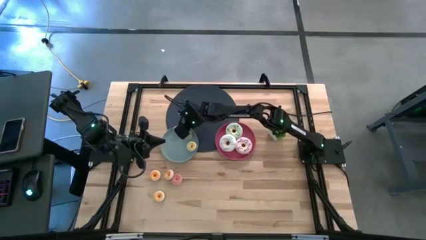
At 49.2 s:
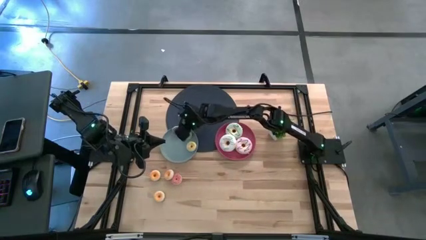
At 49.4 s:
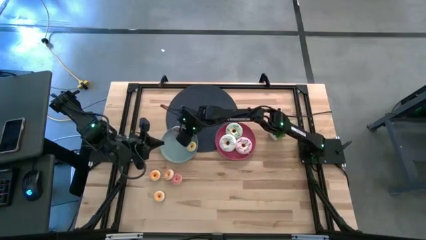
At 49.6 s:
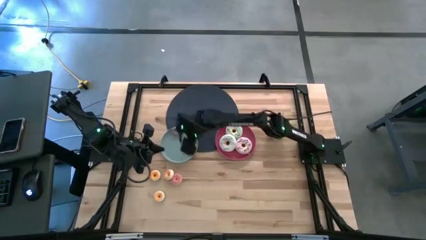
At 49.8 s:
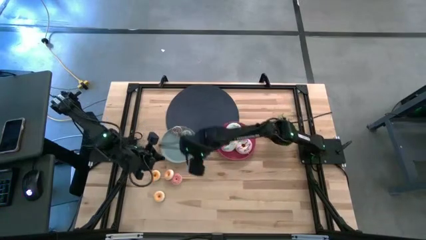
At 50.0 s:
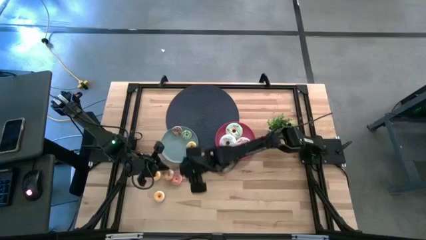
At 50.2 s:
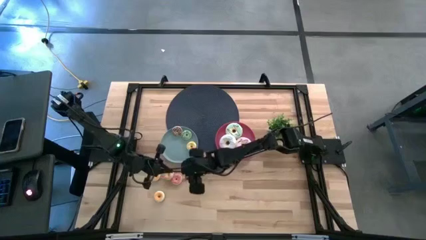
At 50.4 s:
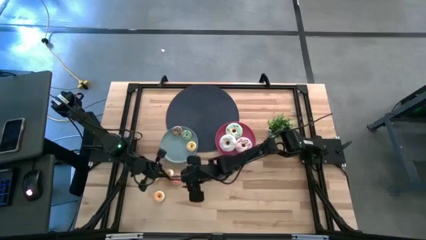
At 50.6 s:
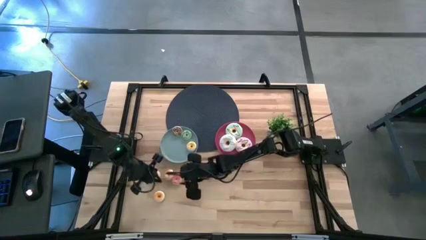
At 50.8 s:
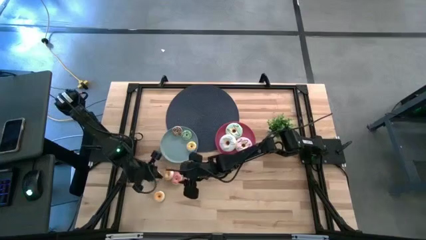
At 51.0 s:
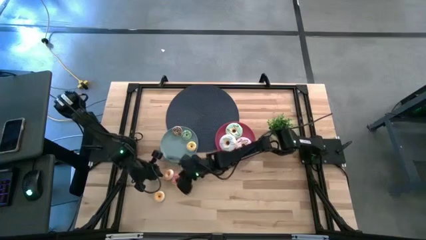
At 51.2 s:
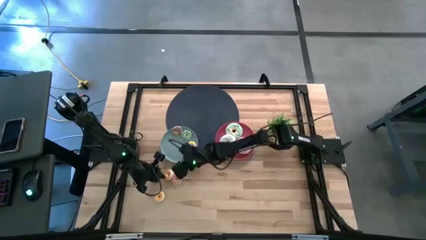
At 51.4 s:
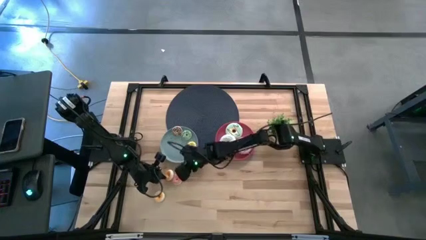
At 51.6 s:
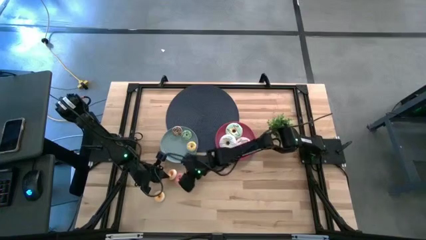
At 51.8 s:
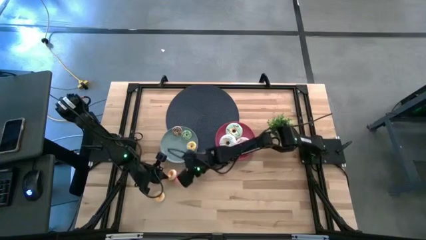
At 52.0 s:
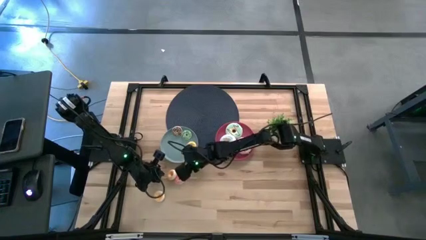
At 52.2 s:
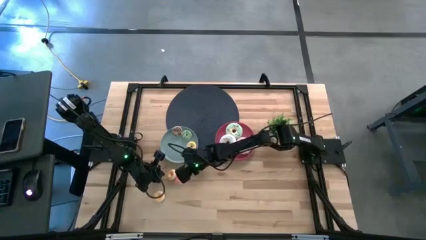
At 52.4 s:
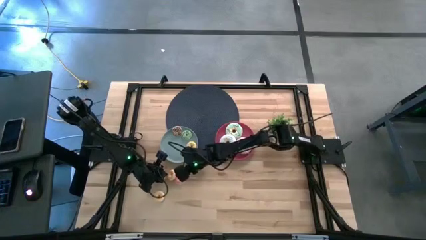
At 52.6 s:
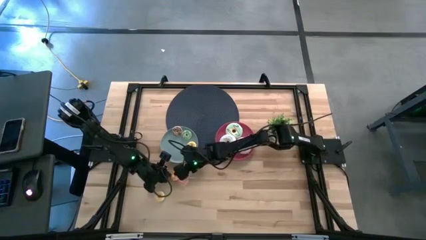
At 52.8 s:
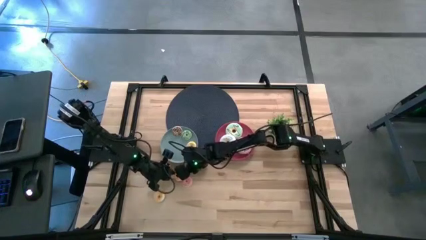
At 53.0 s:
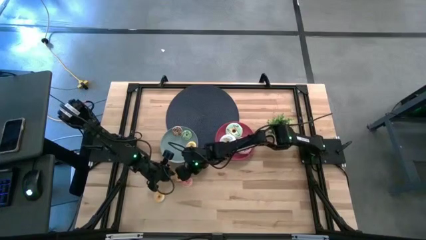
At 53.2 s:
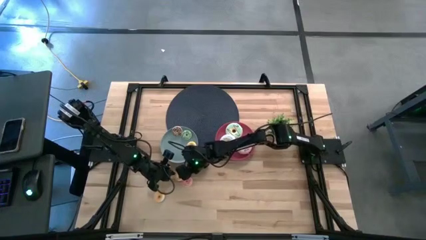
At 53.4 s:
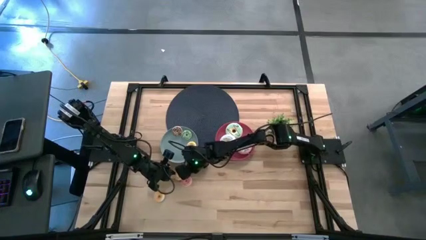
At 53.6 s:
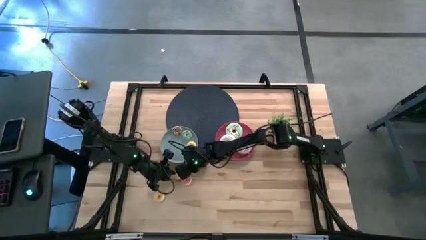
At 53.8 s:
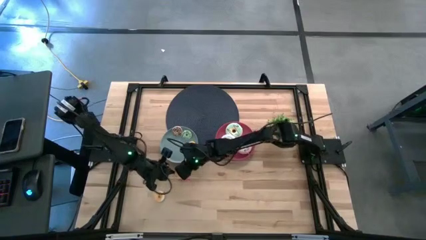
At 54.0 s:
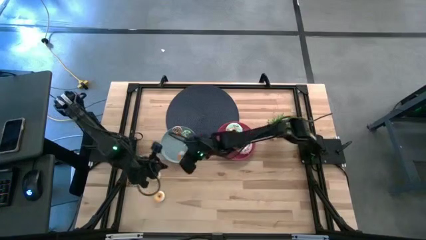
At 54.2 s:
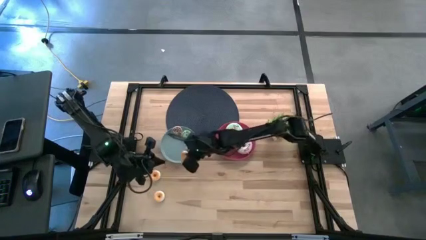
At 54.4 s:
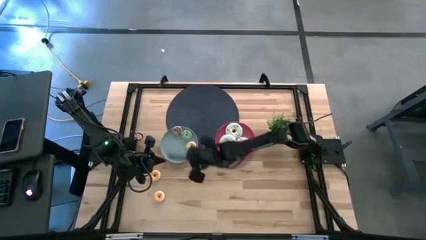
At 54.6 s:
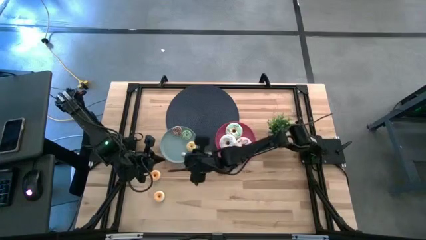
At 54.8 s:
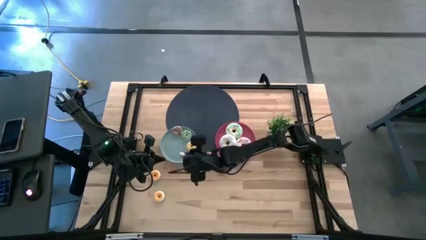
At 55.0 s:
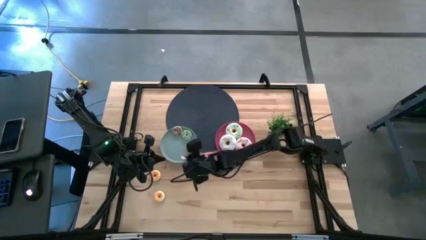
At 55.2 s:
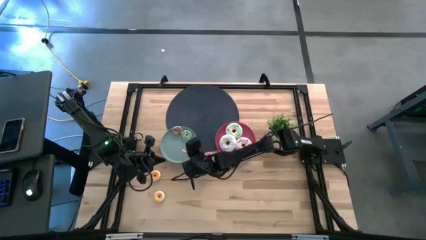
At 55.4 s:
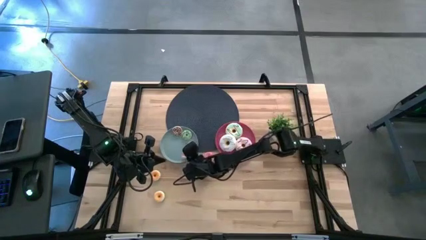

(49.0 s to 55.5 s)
Task: Pick & Place donuts
Put the small red doughnut on the blue plate

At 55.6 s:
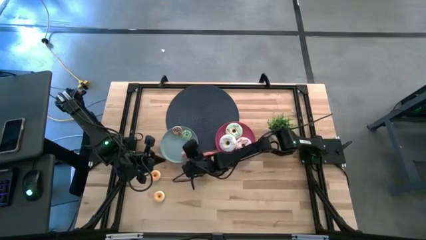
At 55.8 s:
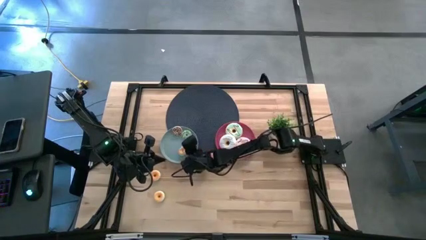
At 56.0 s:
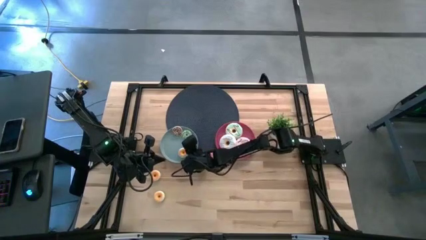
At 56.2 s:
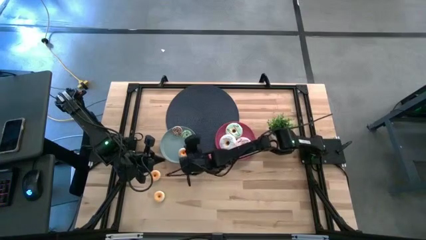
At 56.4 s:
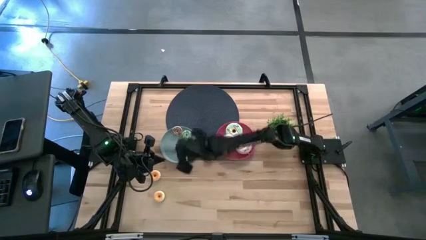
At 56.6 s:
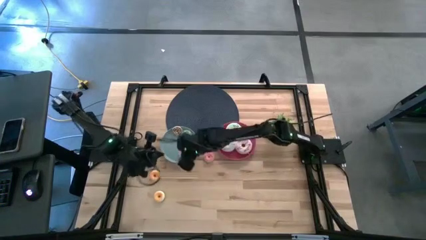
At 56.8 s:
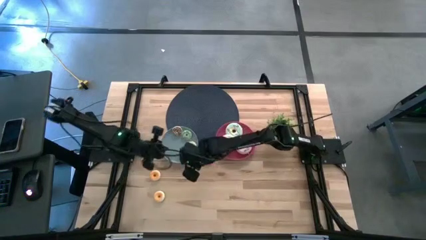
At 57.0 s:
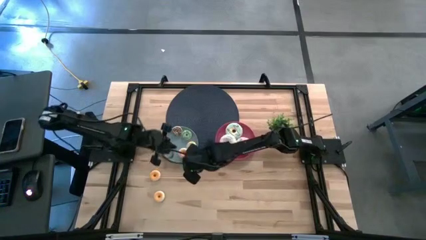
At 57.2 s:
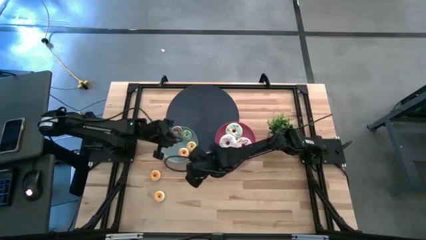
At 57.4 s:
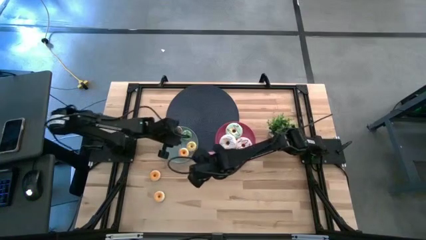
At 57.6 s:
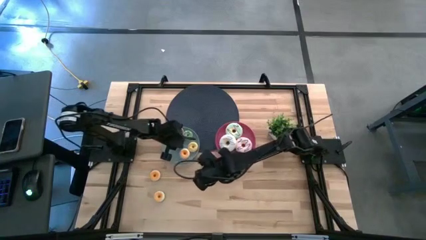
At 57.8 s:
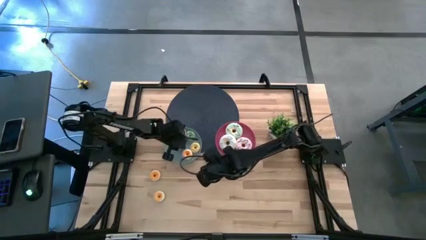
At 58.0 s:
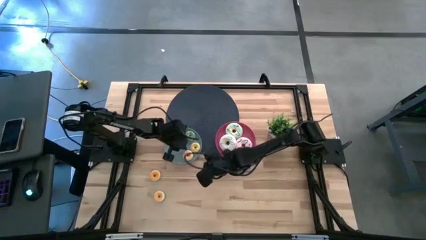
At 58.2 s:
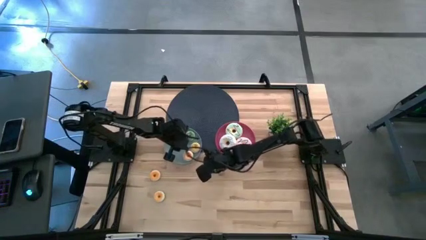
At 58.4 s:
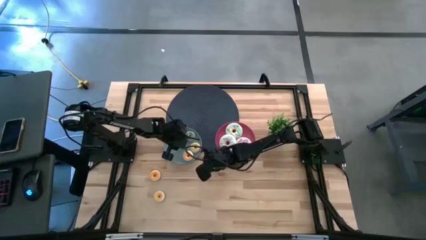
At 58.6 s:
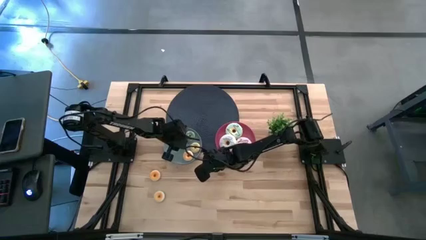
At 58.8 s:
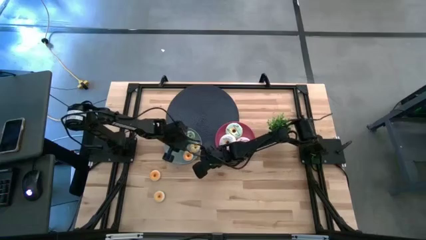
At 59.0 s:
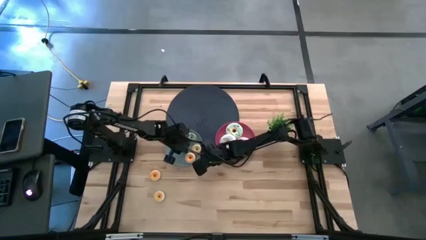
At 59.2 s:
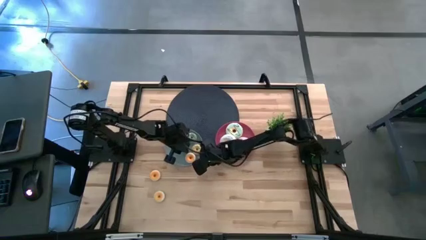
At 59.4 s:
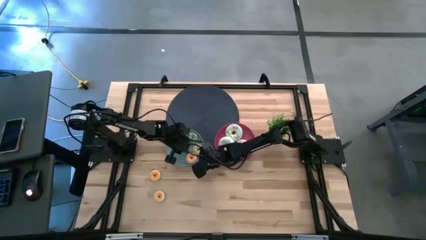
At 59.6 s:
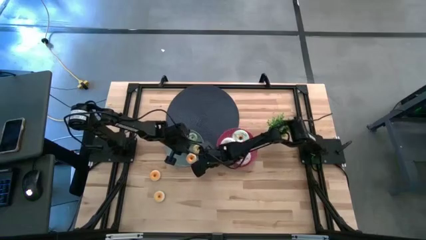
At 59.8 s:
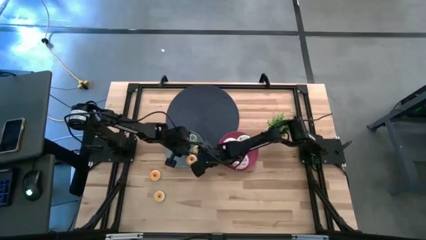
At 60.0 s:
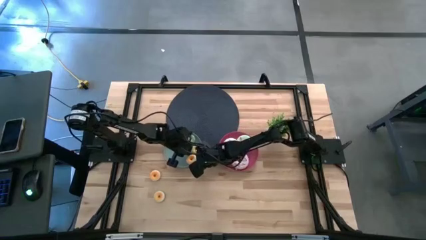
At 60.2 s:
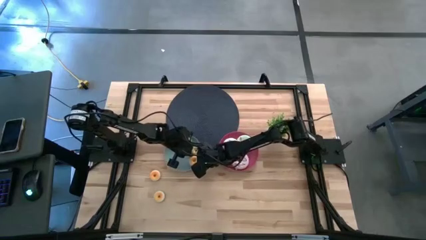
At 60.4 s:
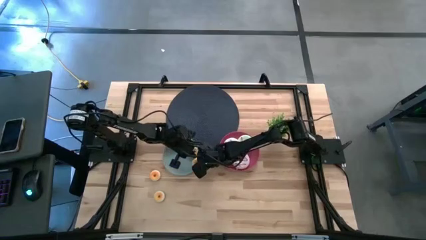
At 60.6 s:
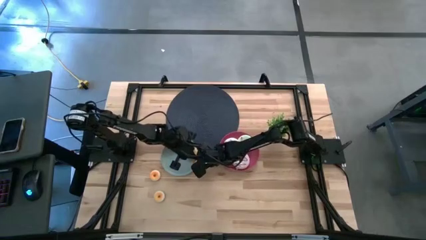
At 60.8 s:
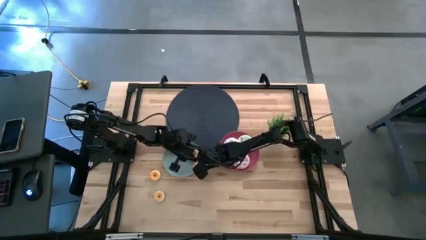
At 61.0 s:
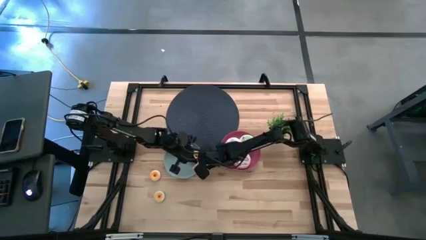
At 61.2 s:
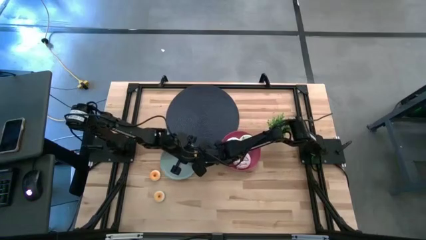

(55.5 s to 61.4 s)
Remove the small red doughnut on the blue plate

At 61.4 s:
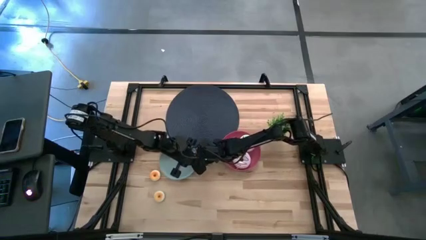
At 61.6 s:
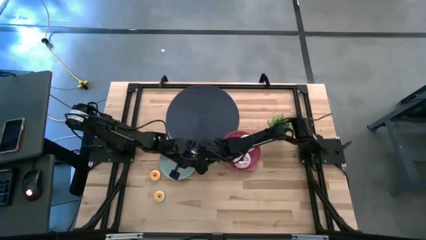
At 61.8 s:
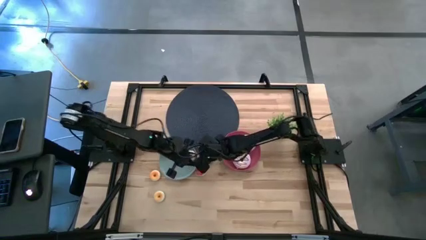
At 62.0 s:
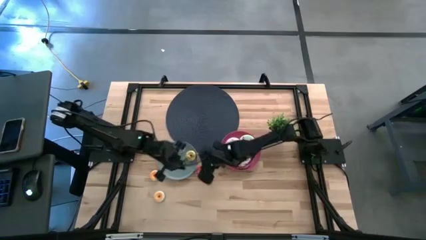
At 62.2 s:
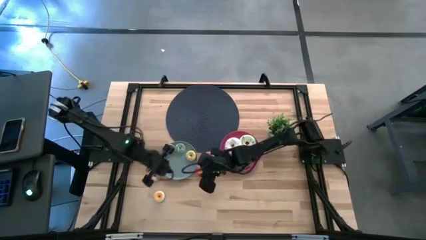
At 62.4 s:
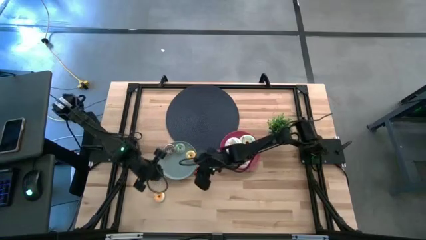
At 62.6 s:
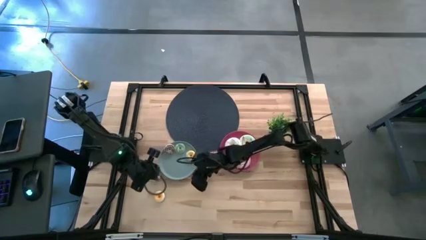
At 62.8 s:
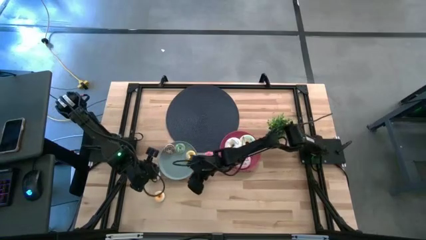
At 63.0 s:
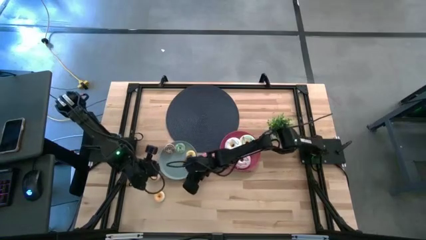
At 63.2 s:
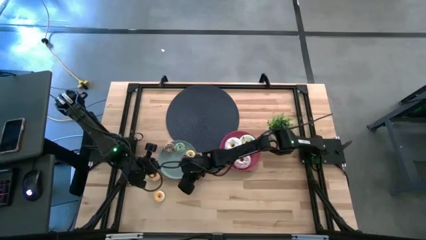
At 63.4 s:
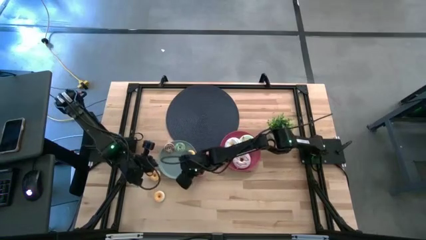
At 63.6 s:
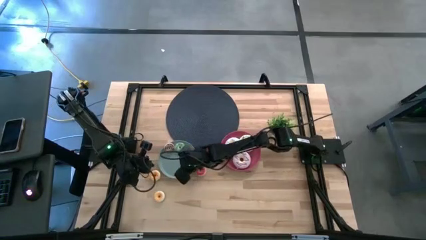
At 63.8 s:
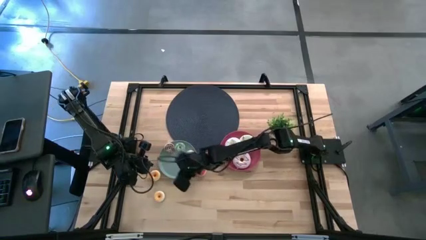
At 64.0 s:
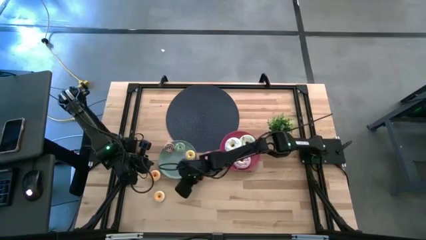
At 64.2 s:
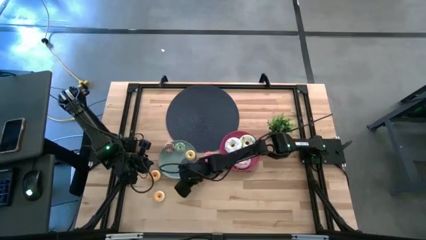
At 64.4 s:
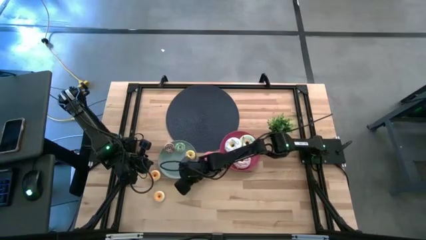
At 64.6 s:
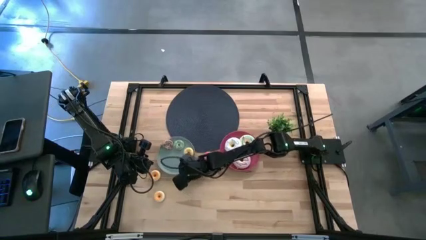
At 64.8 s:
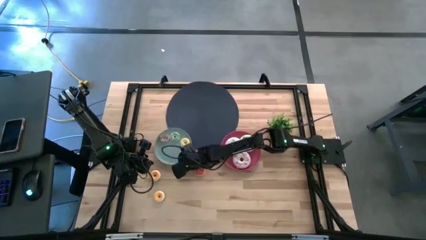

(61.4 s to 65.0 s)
Adjust the blue plate

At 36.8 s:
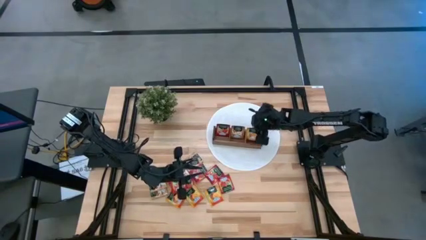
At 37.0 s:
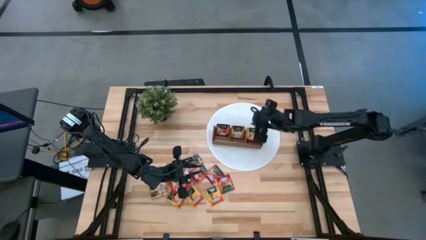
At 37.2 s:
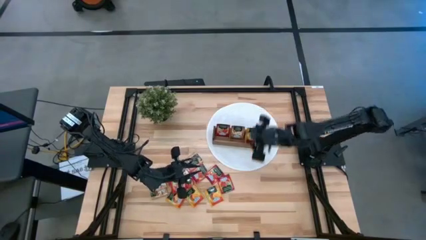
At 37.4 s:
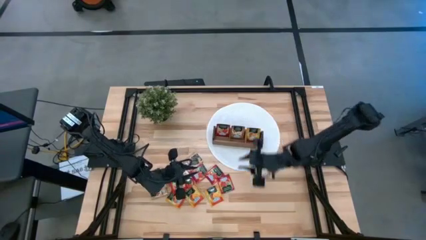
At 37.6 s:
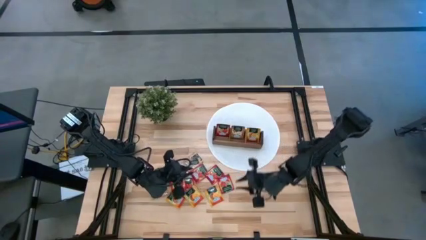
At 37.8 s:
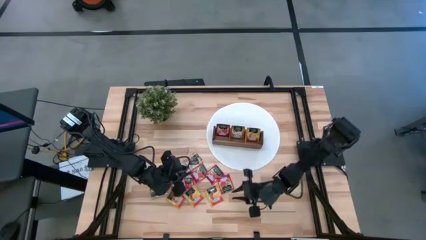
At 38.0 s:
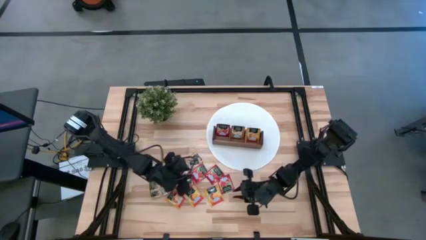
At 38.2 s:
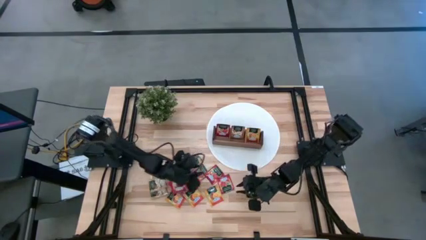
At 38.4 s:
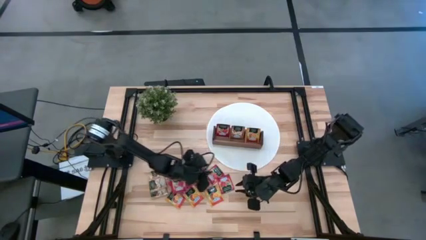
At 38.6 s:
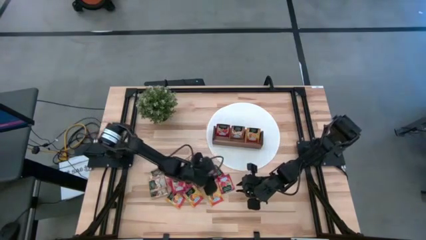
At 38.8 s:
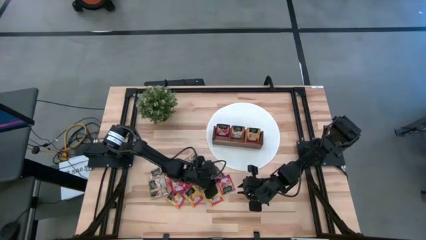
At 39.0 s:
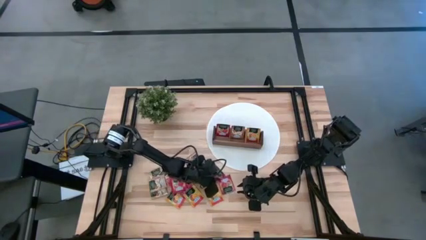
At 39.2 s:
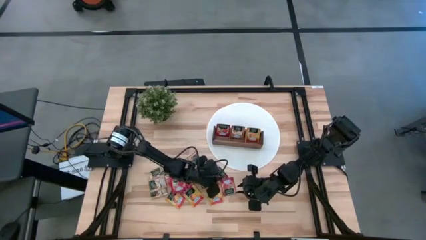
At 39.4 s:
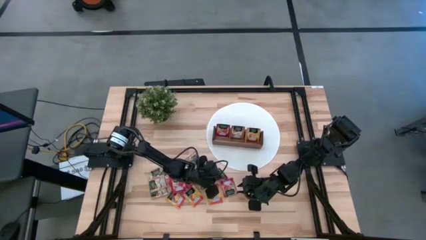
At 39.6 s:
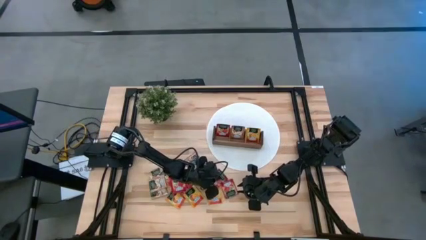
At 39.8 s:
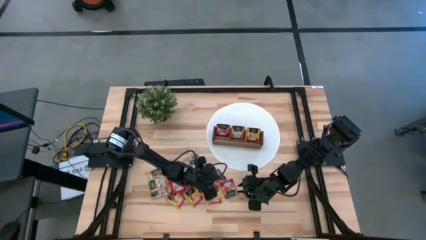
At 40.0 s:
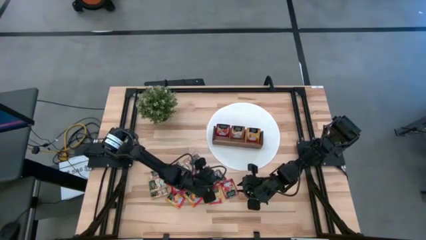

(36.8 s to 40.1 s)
Task: Pick & Place Tea
Put the red tea bag into the left section of the wooden organizer
